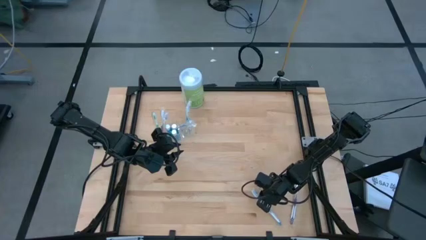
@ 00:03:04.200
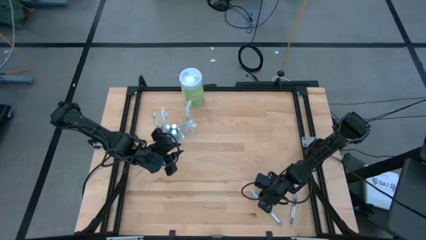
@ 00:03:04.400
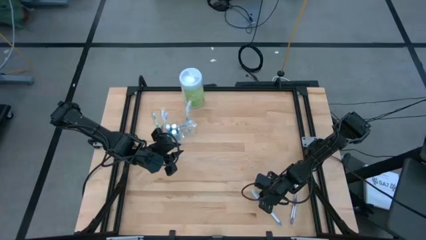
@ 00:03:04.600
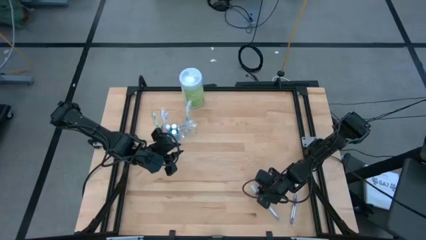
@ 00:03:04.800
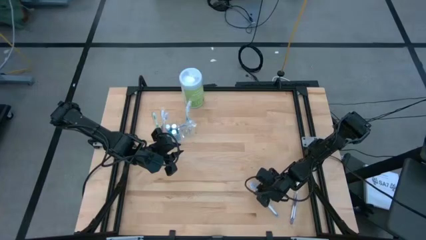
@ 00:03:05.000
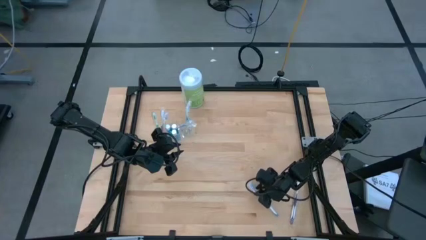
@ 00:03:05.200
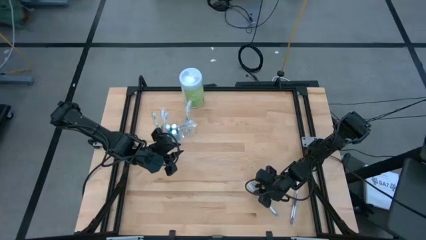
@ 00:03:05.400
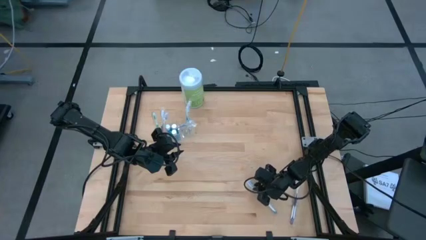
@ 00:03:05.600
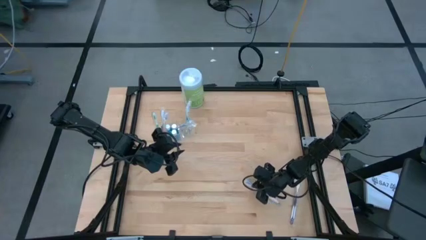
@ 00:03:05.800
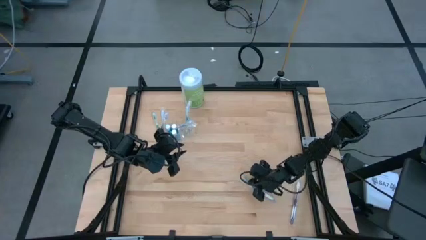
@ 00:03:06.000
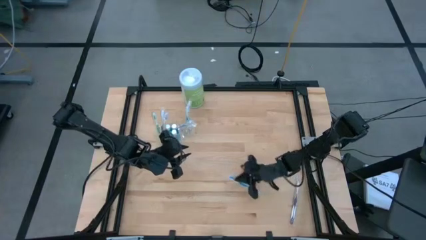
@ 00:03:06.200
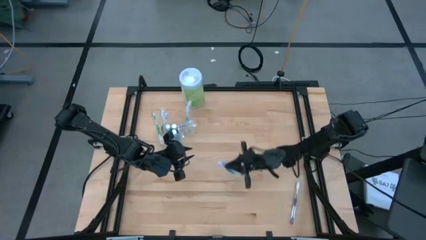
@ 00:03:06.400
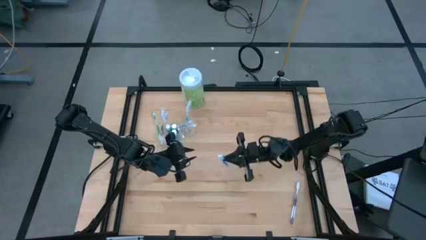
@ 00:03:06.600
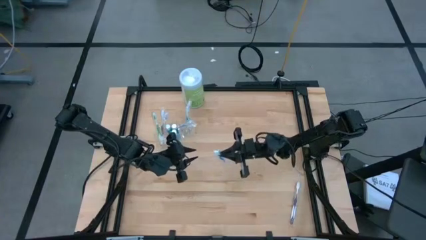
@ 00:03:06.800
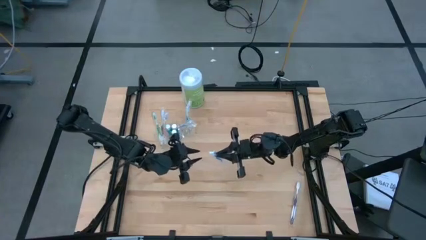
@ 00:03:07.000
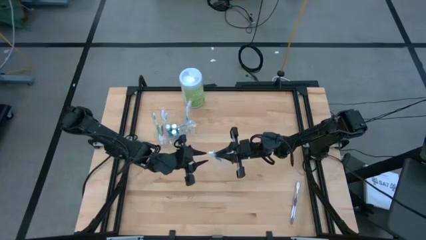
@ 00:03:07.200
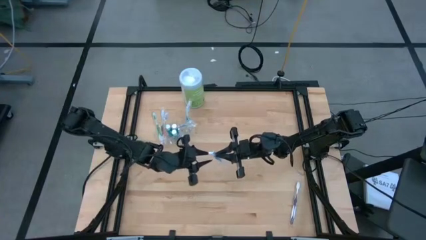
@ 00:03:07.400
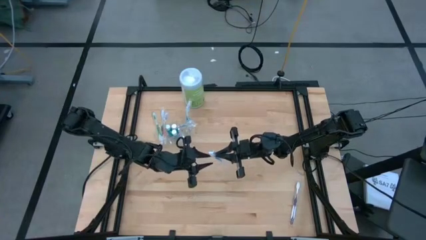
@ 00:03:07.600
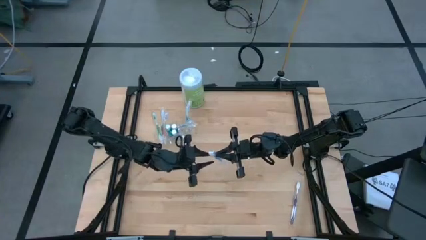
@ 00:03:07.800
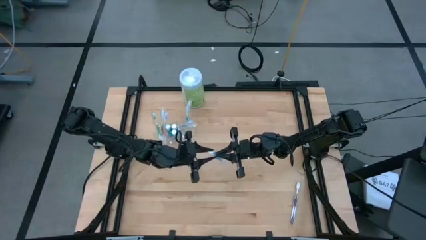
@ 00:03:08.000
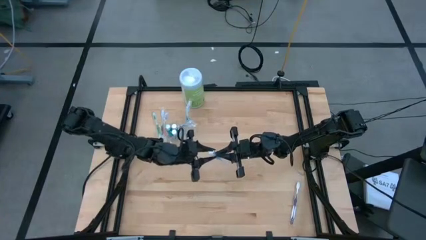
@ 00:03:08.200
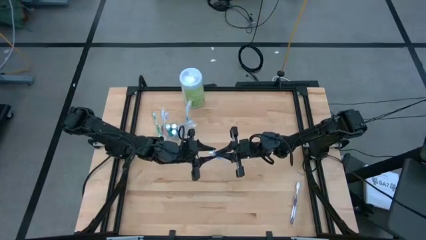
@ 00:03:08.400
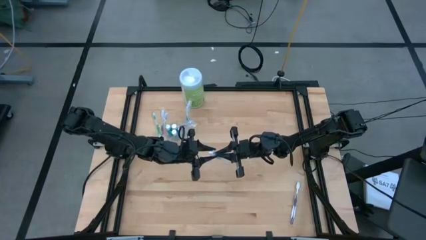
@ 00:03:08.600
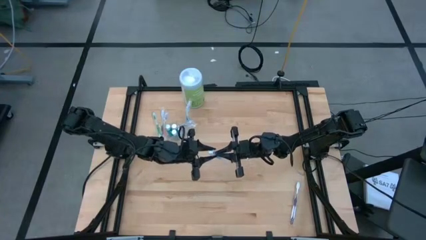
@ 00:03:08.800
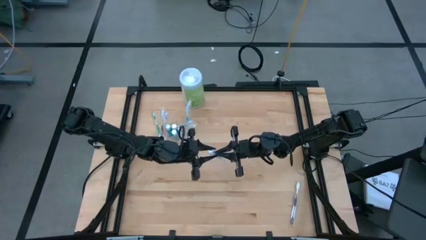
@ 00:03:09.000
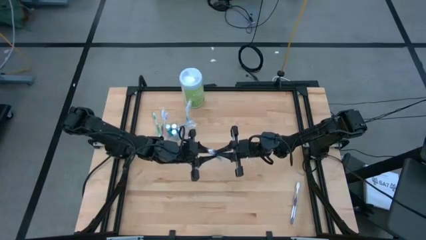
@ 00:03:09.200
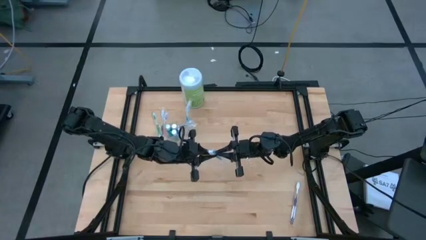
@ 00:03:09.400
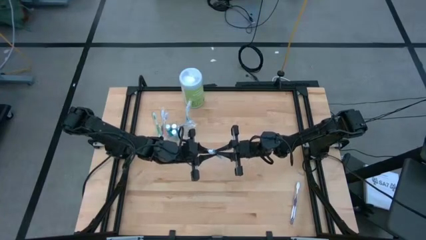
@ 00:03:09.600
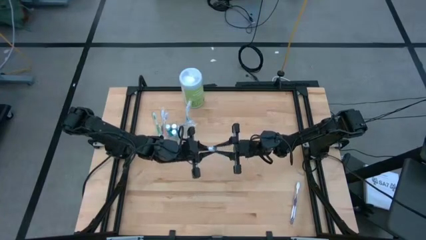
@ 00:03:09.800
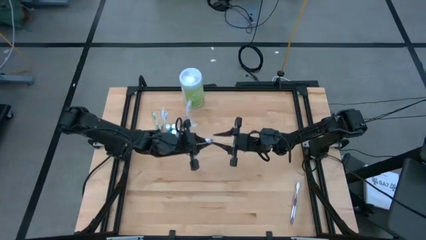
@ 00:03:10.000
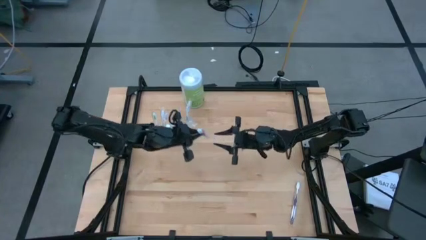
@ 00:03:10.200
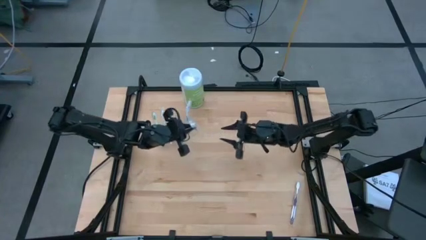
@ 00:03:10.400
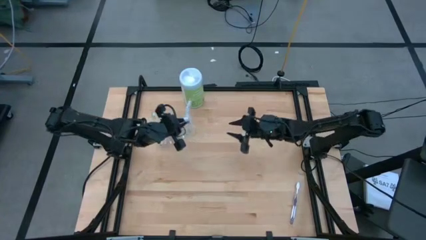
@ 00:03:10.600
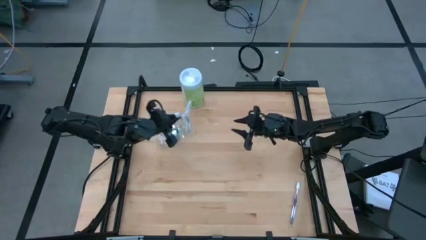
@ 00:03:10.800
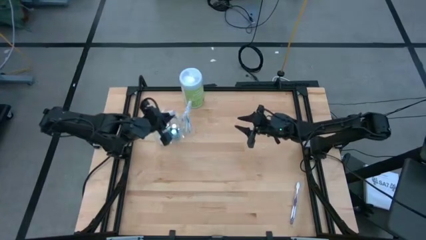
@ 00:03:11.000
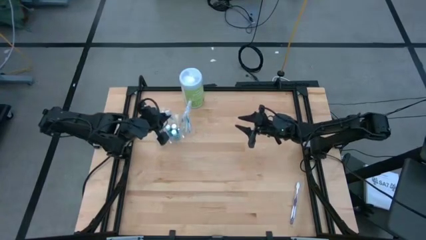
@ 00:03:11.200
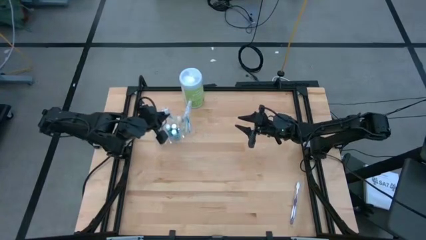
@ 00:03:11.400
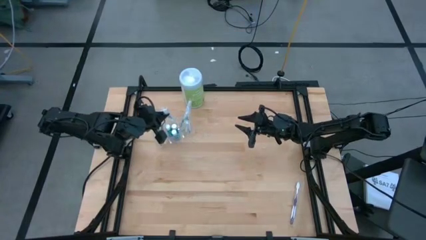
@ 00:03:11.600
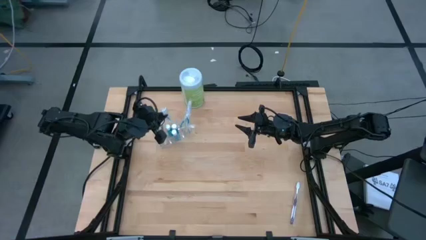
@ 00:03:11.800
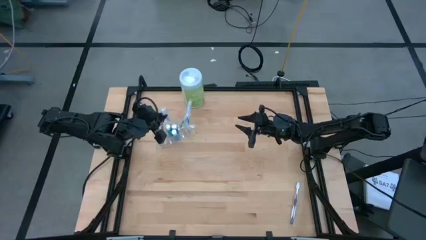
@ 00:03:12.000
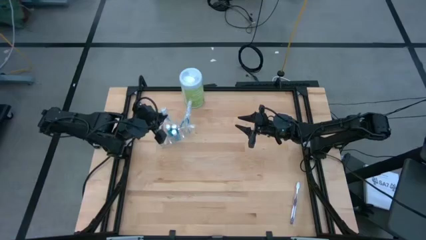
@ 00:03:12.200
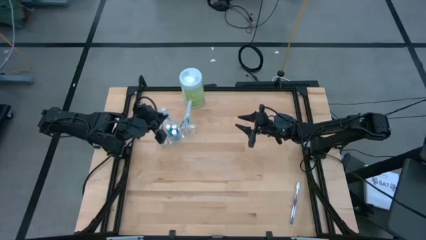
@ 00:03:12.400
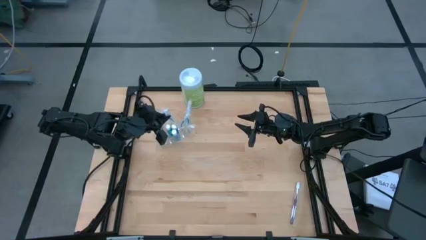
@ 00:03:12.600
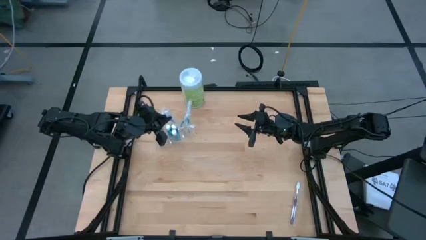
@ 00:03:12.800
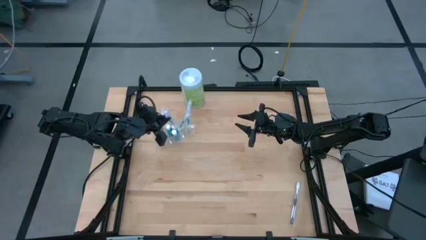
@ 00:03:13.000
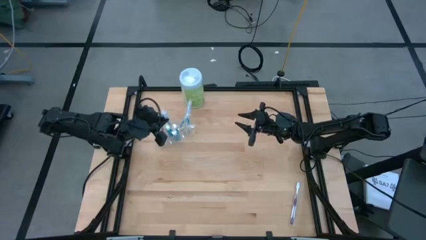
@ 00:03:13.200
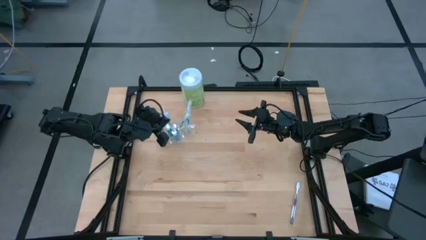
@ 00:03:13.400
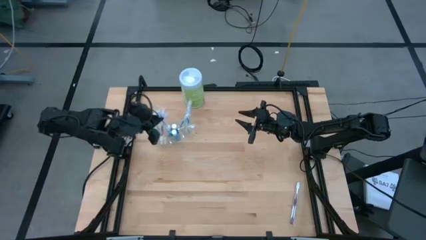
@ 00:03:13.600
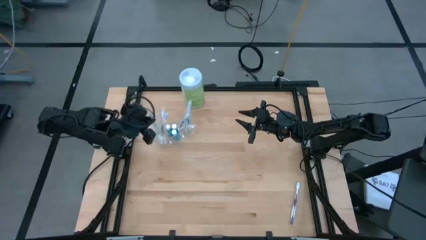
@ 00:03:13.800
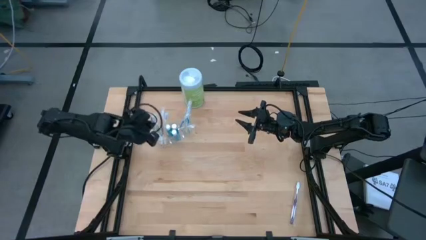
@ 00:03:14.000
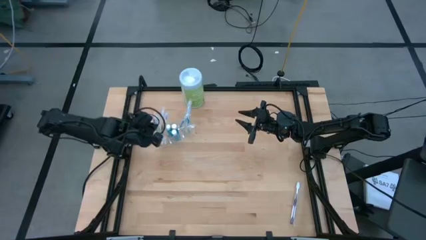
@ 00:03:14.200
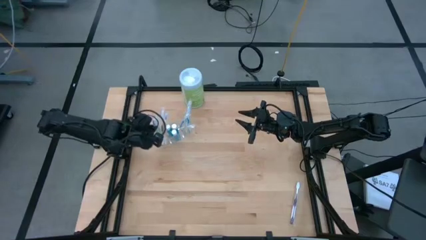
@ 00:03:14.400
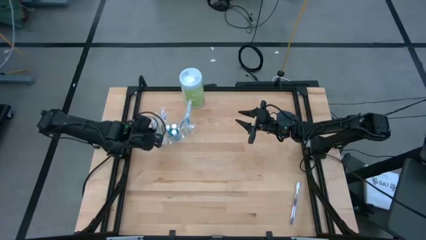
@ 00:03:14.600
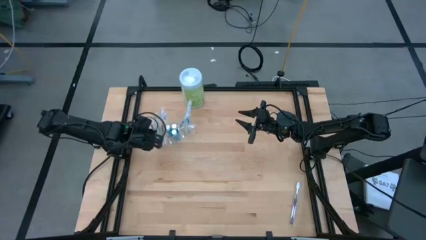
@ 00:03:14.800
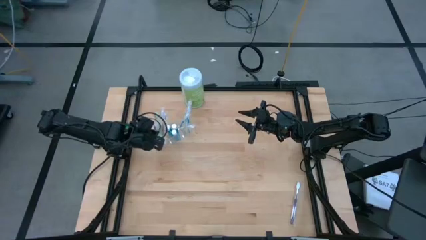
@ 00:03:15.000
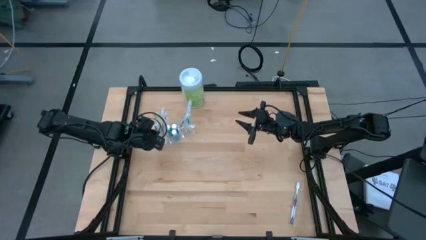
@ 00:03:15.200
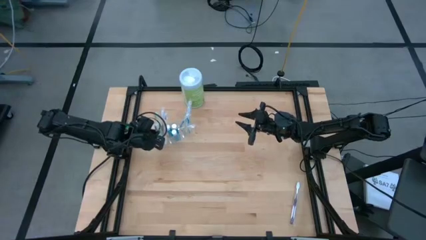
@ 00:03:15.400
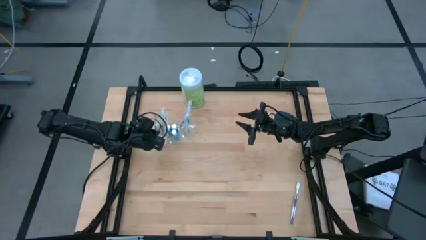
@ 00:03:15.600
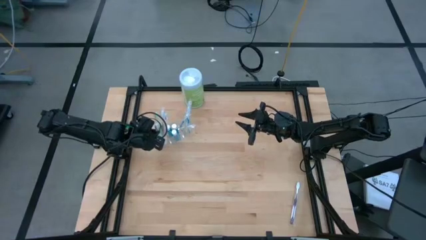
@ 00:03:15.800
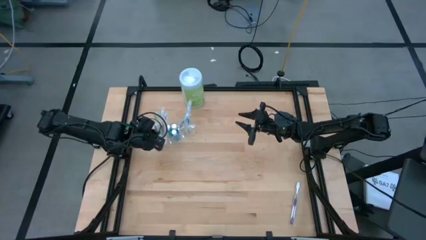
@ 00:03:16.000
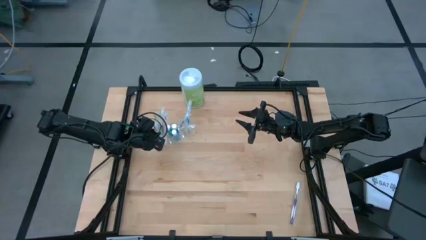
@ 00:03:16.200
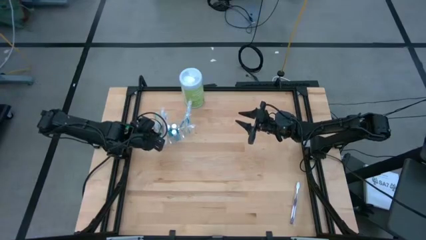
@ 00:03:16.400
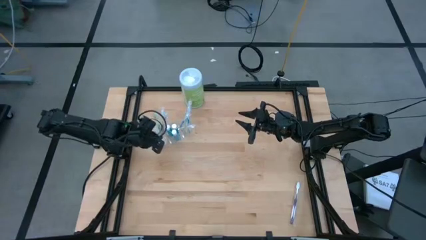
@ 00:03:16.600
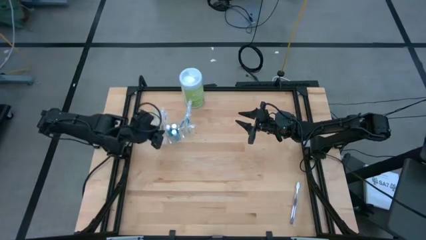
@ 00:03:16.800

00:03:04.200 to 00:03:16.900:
Task: Pick & Place toothbrushing station
Put the blue toothbrush into the transparent organizer

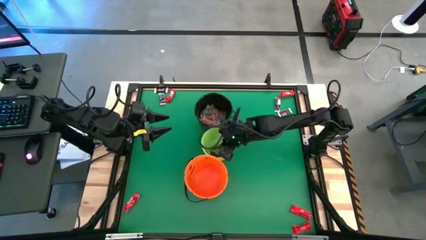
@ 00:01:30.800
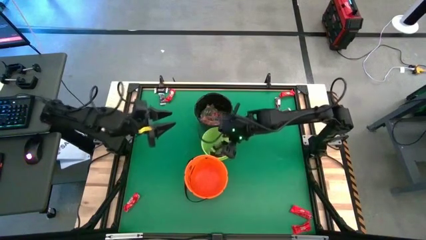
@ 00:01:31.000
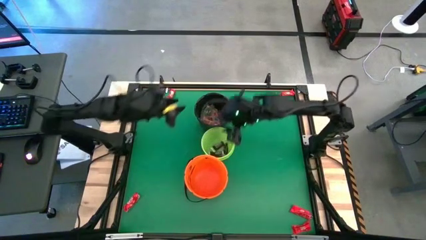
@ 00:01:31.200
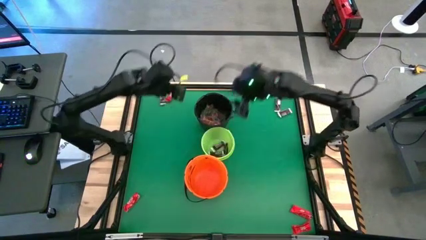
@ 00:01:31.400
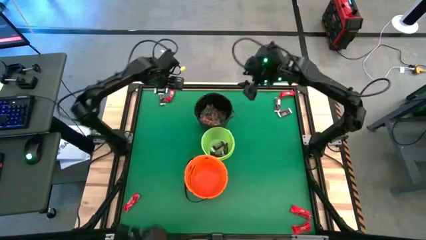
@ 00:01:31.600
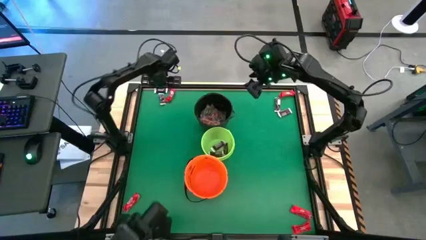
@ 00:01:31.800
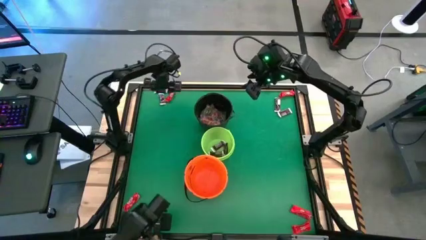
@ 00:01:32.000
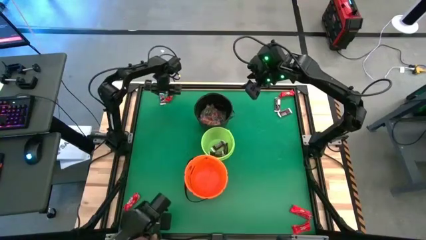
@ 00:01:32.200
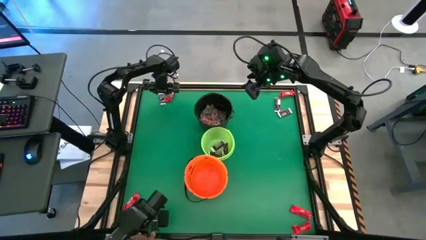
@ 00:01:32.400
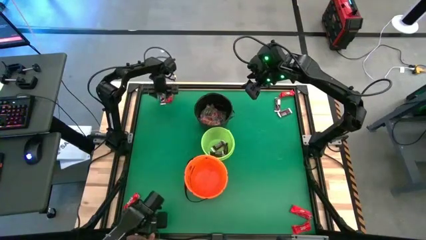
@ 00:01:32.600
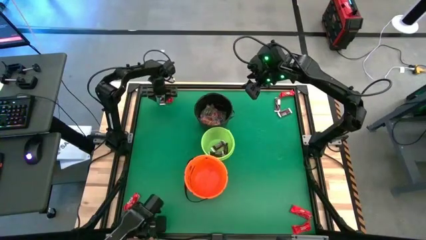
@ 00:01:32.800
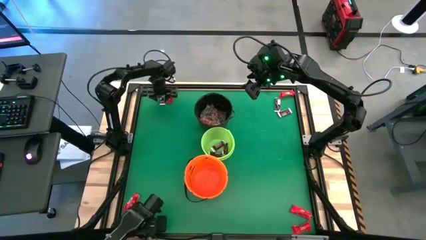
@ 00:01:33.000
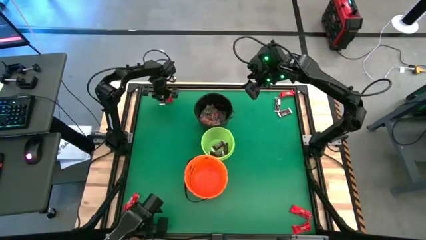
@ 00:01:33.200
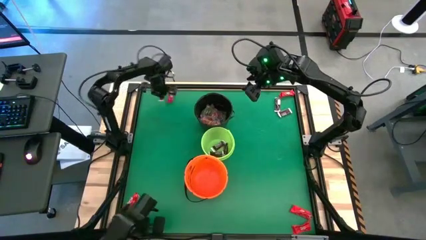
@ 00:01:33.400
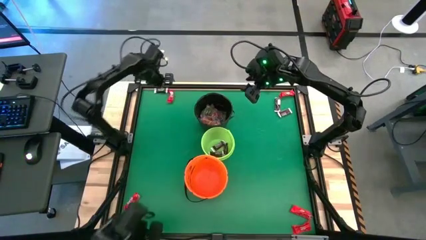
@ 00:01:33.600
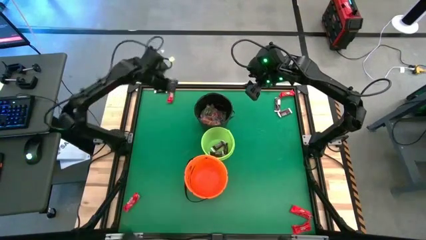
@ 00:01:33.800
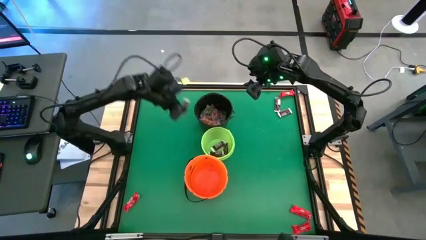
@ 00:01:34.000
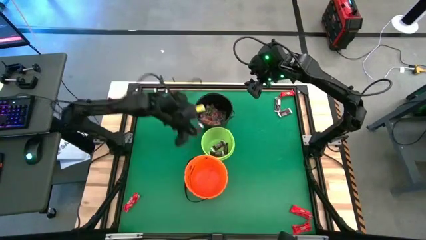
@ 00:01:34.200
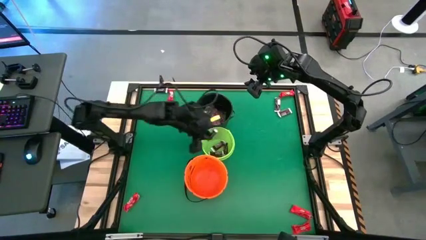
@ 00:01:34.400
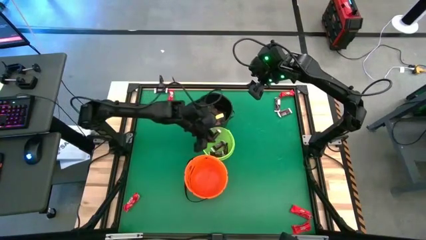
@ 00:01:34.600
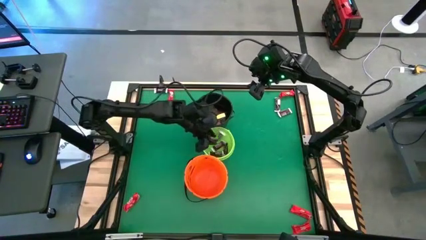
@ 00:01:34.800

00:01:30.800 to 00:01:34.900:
Task: Sort candy by brand, put in halloween buckets
Put the brown chocolate bar into the green bucket
